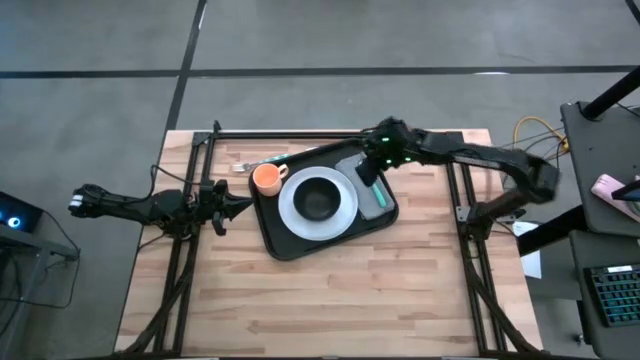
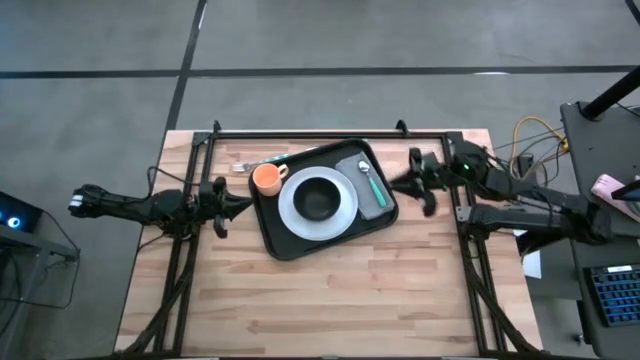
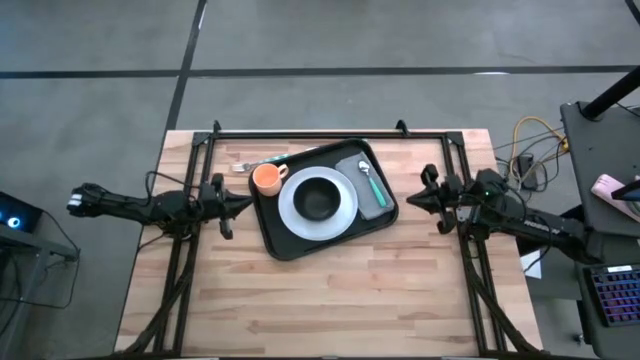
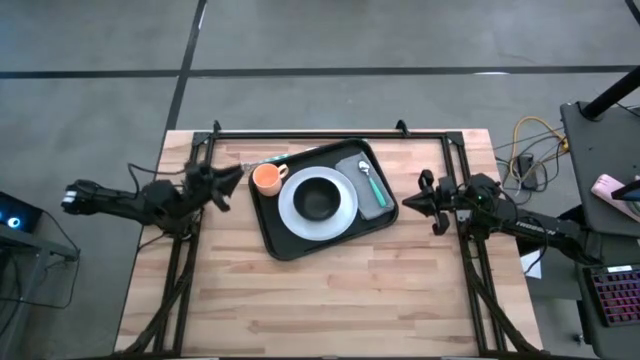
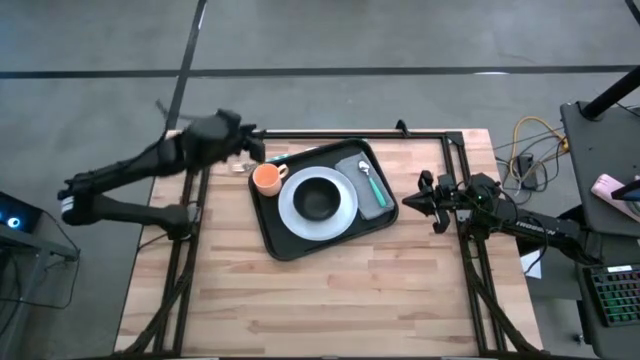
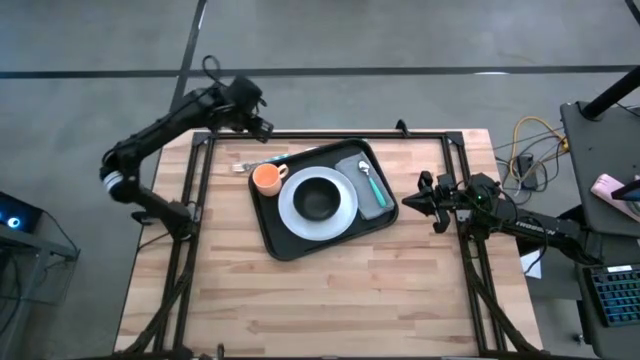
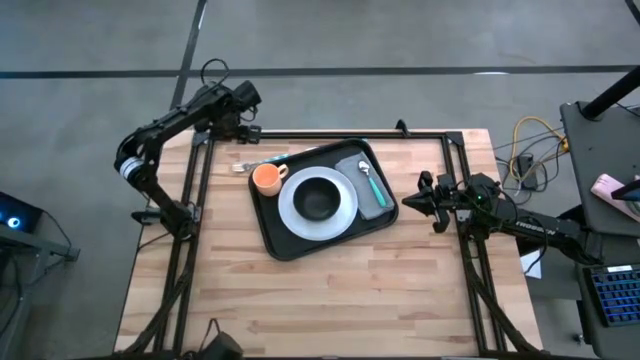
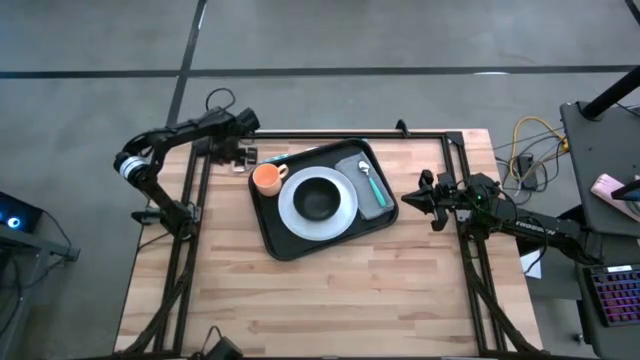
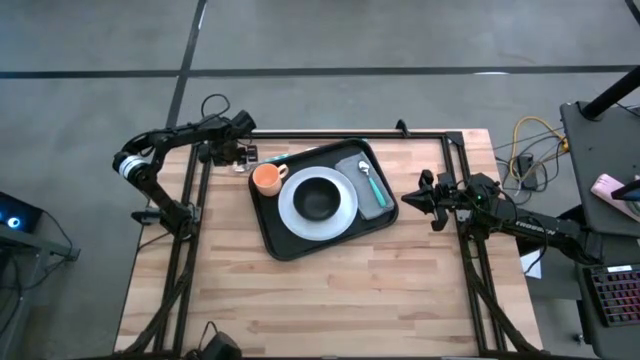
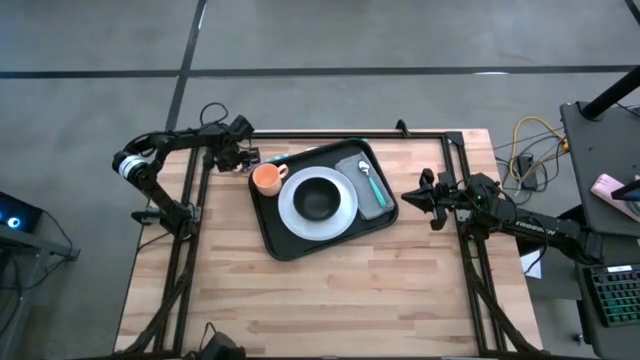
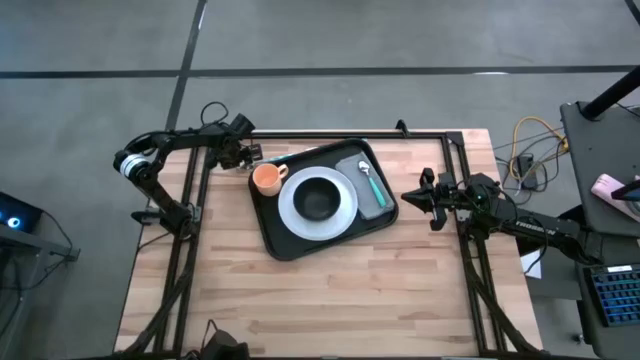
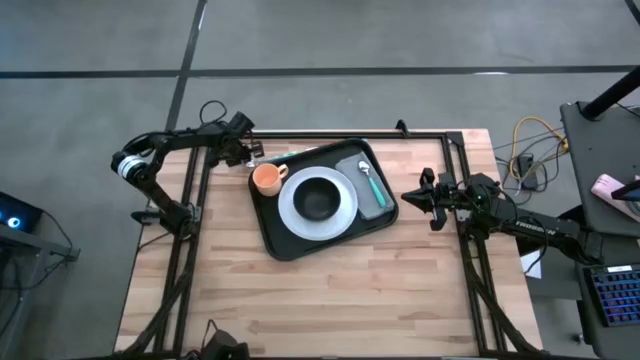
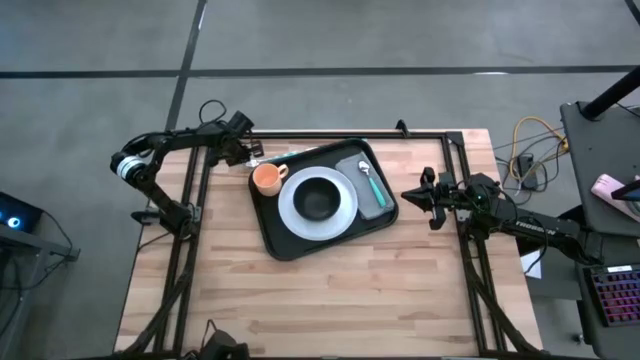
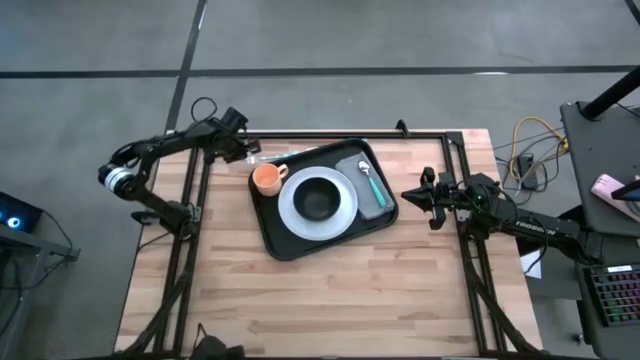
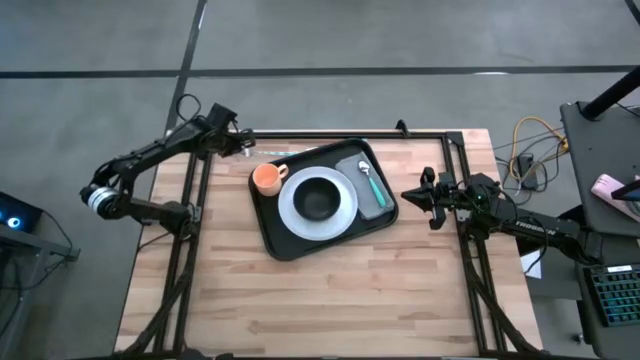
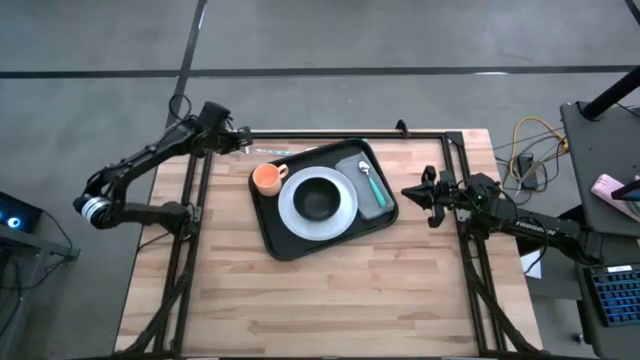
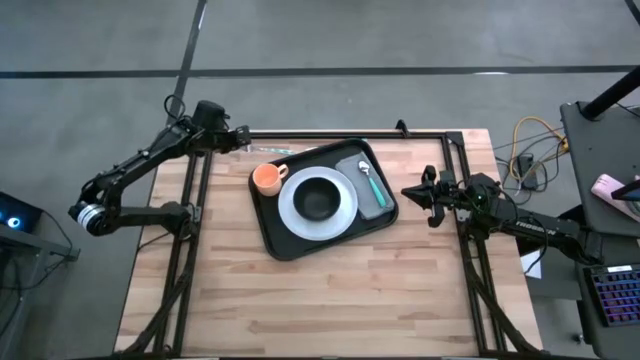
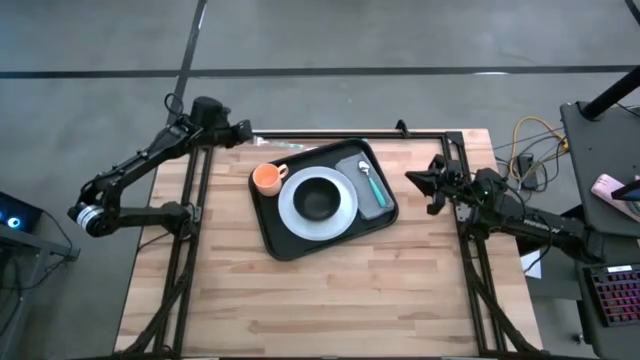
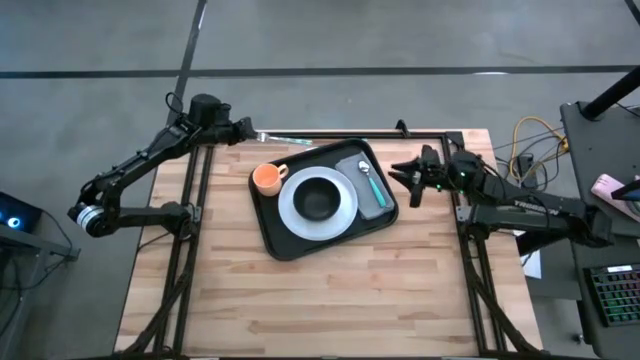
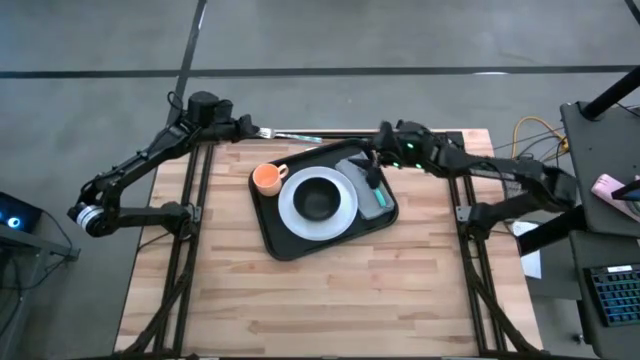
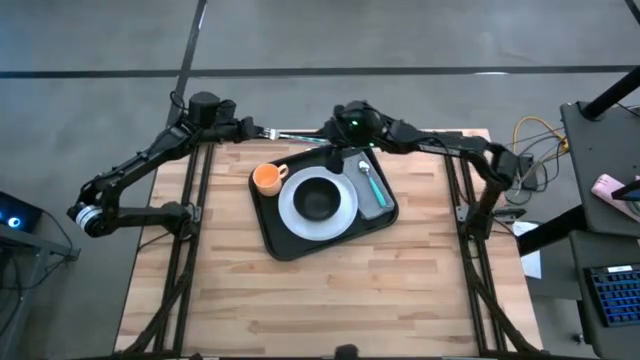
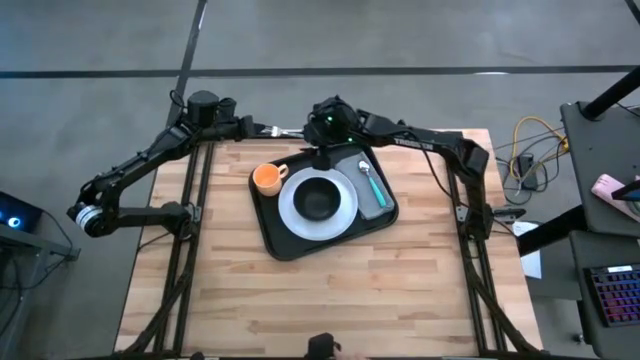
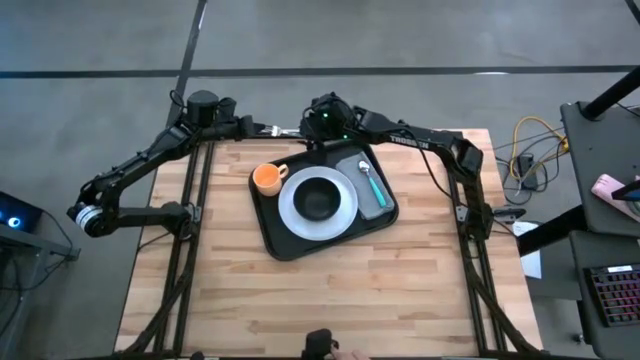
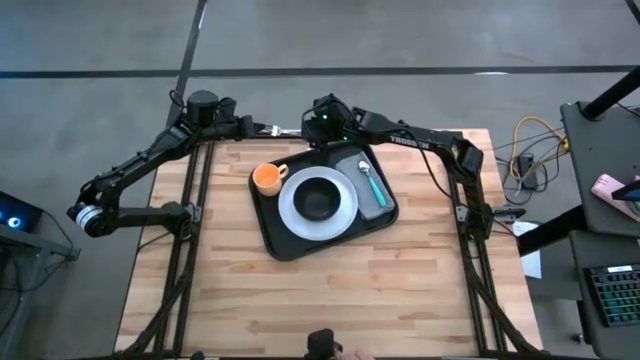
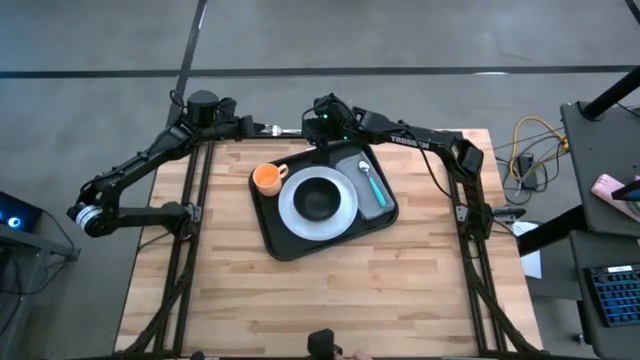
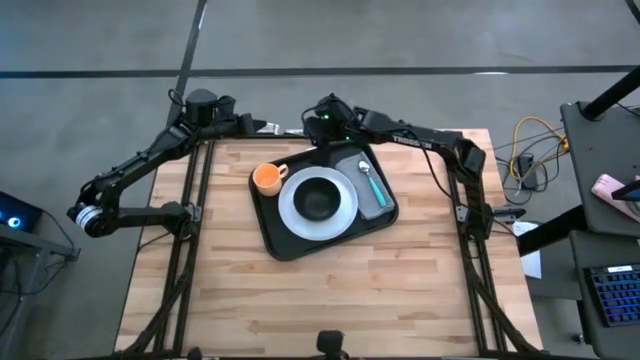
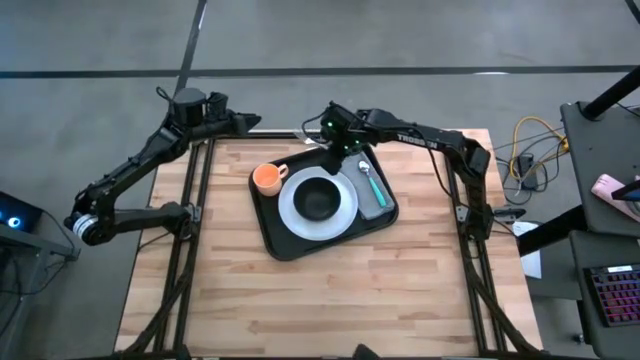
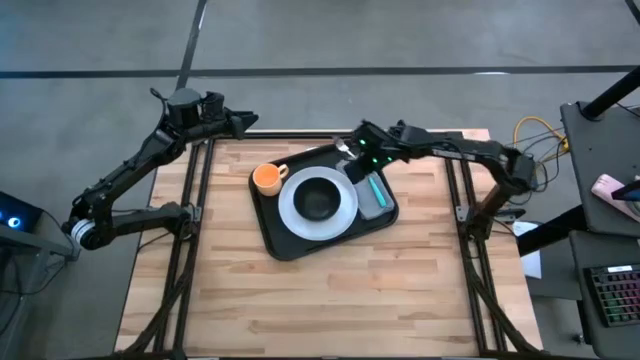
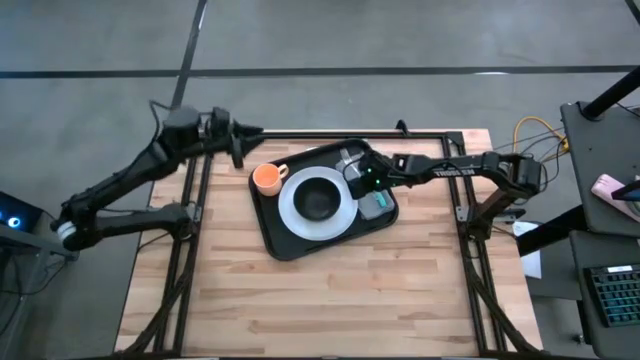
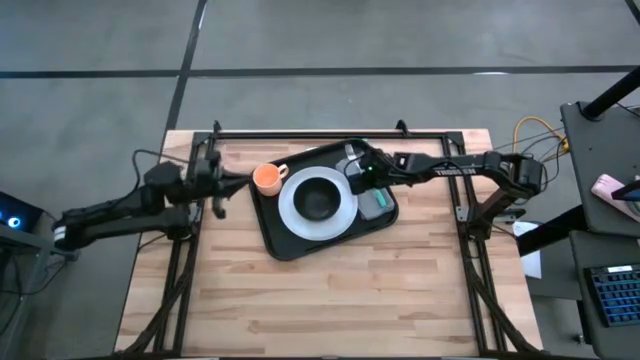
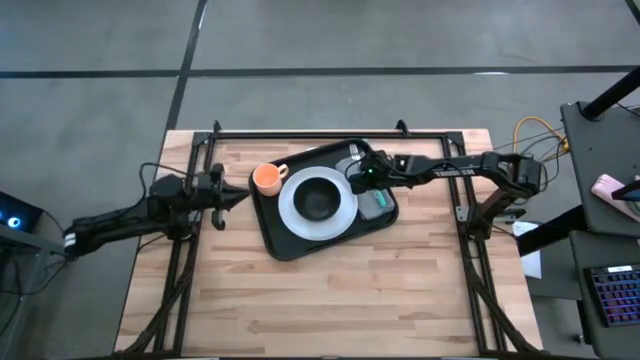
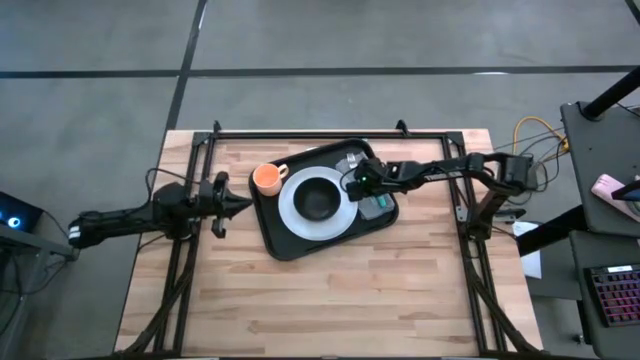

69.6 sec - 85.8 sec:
Task: Set up tray
Put the light blue fork on the gray napkin to the left of the light blue spoon on the black tray

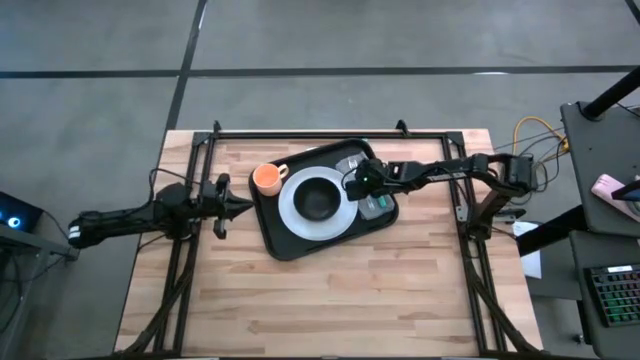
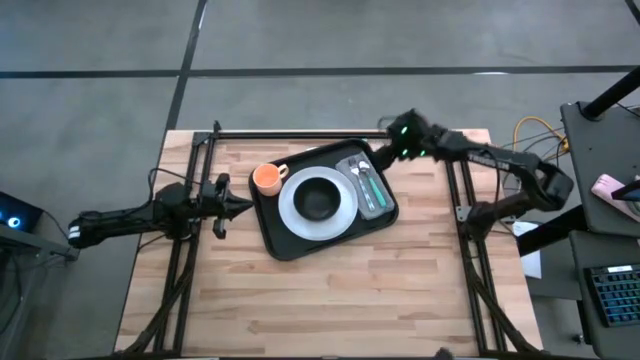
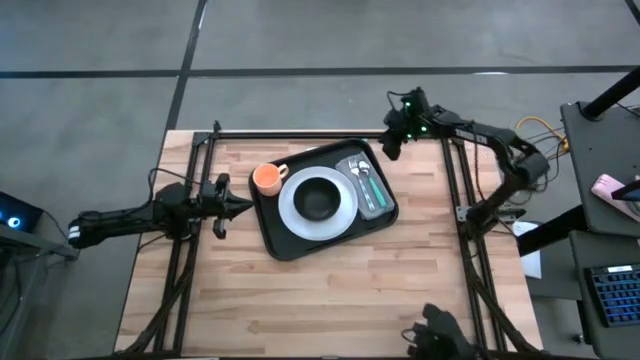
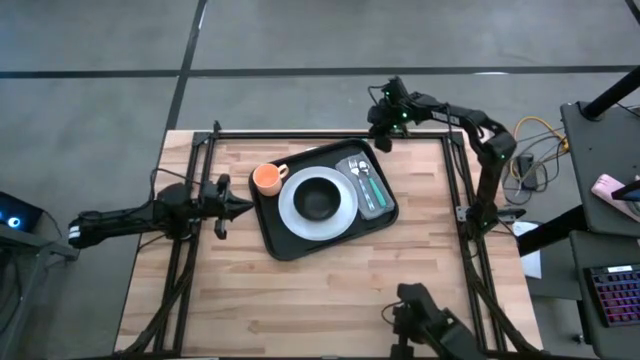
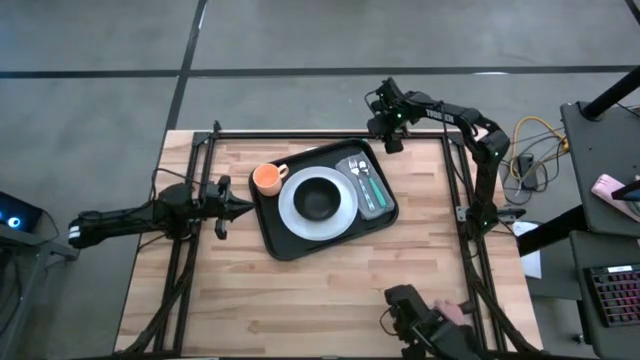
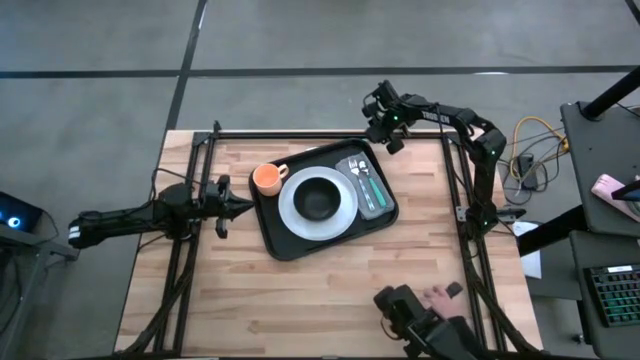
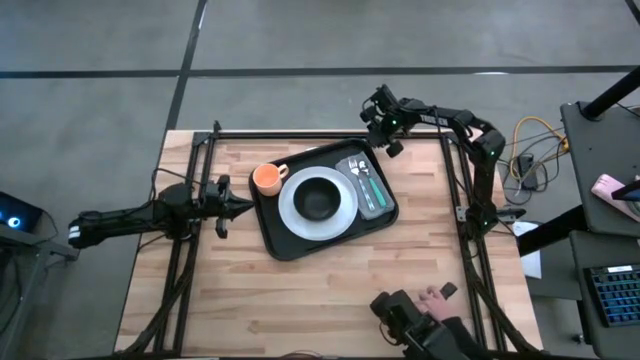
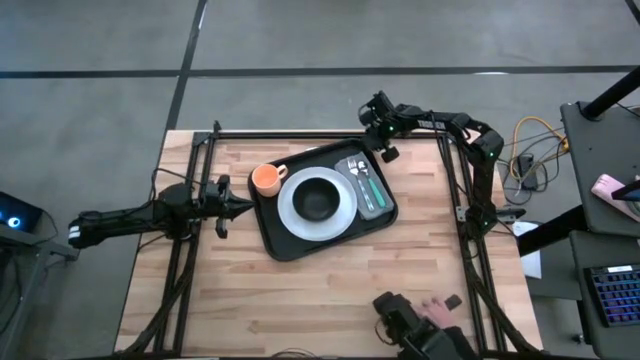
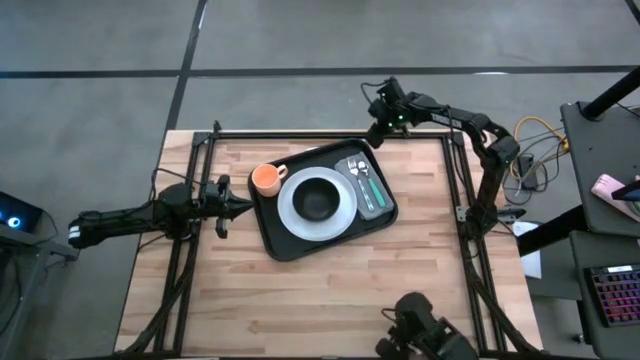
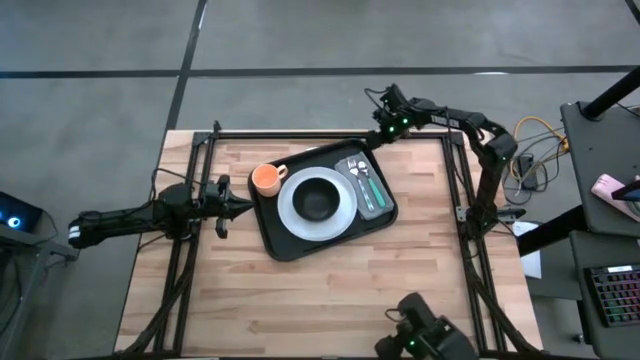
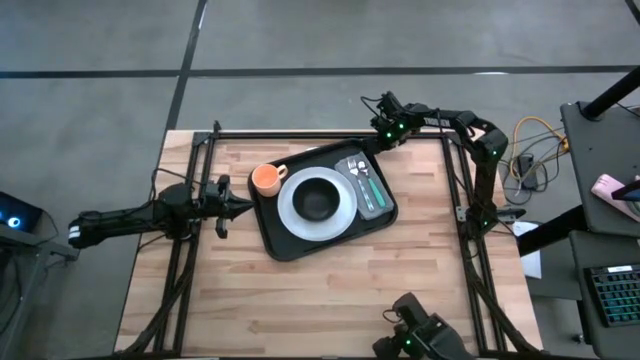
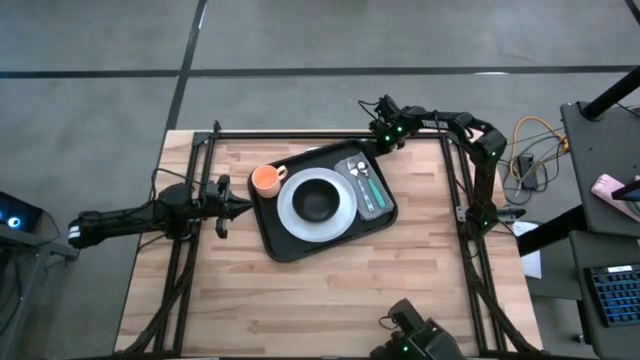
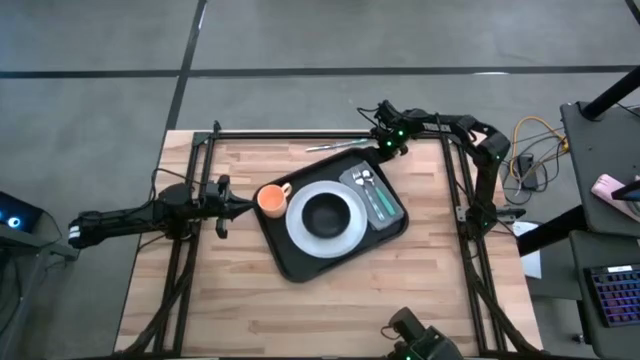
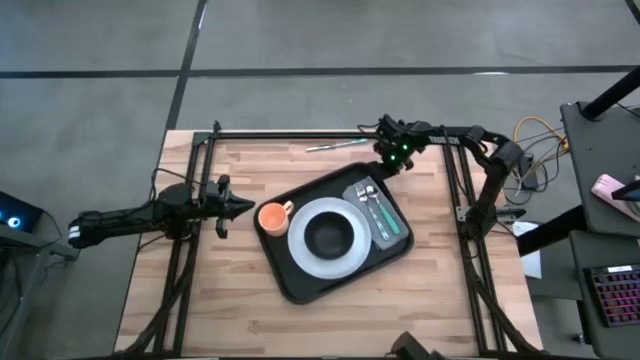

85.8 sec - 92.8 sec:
Adjust the black tray
